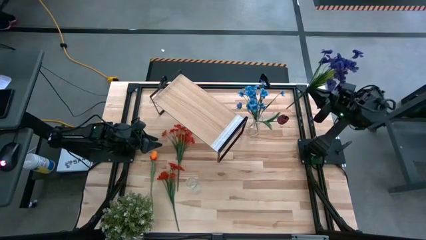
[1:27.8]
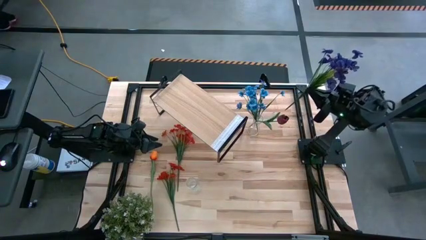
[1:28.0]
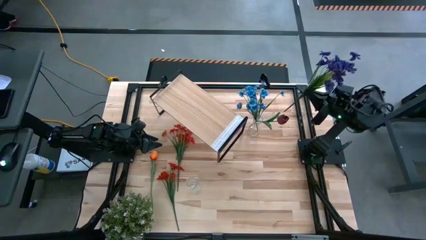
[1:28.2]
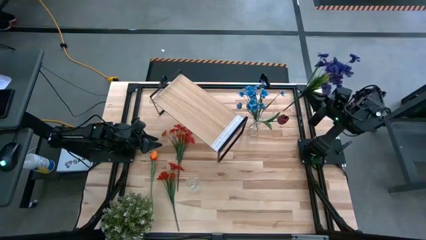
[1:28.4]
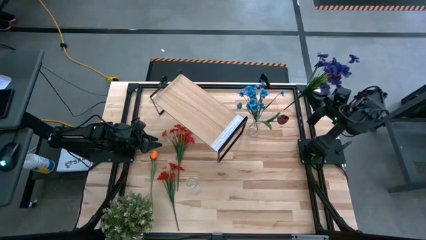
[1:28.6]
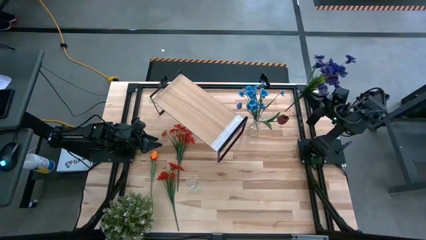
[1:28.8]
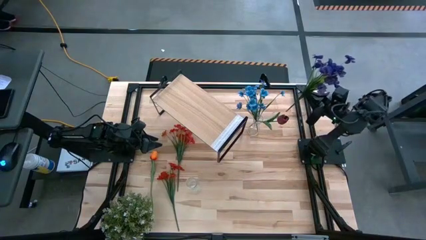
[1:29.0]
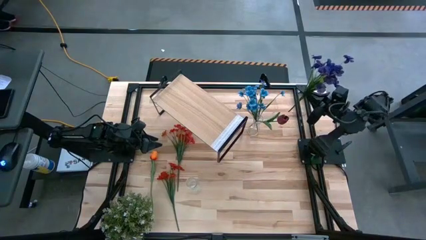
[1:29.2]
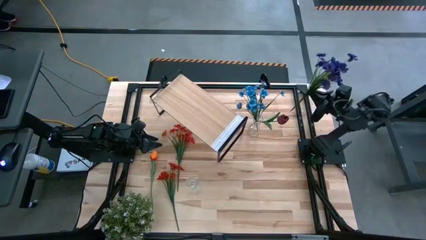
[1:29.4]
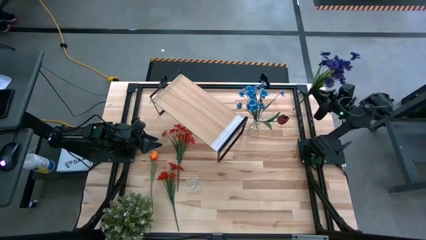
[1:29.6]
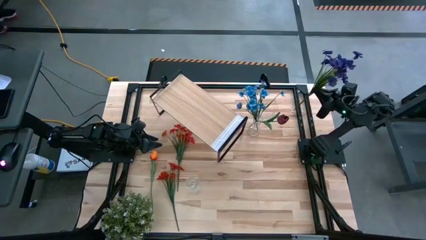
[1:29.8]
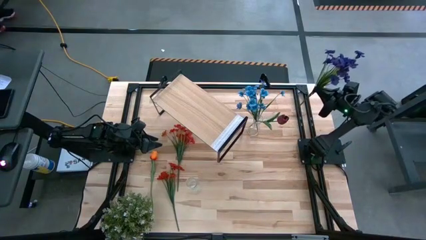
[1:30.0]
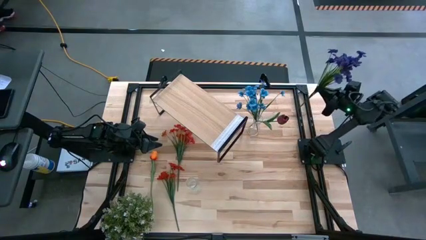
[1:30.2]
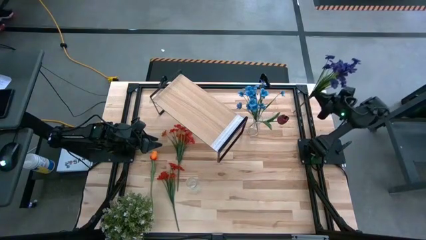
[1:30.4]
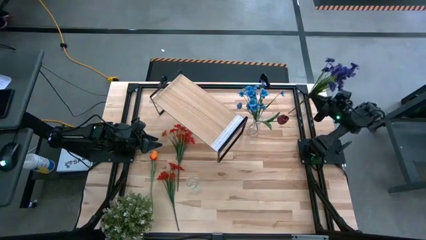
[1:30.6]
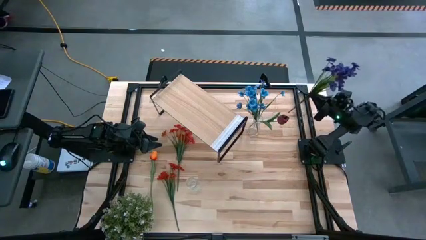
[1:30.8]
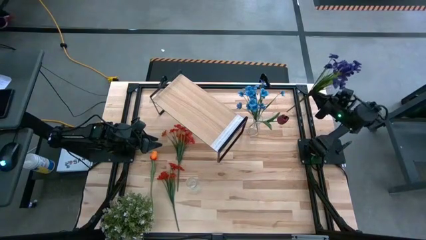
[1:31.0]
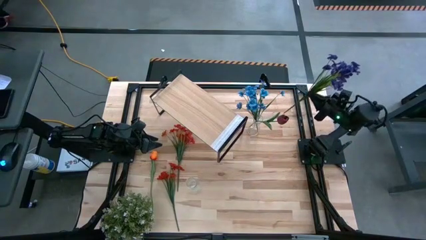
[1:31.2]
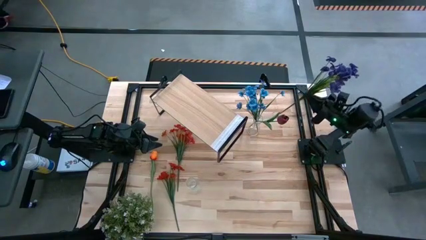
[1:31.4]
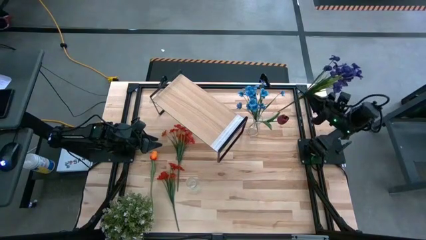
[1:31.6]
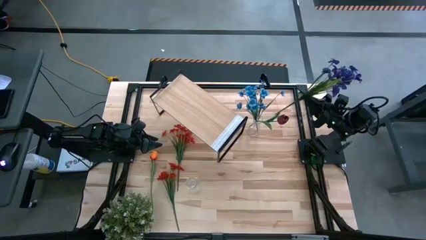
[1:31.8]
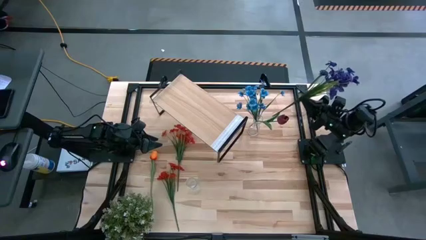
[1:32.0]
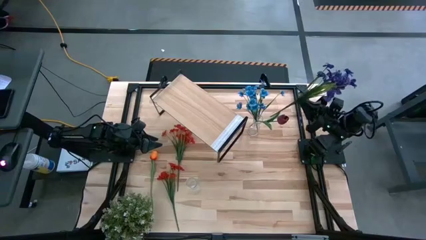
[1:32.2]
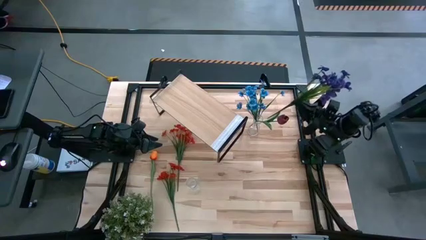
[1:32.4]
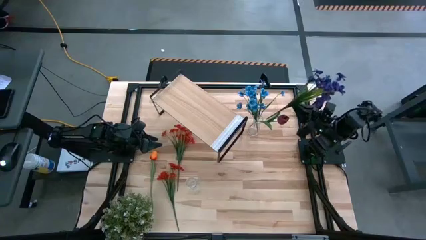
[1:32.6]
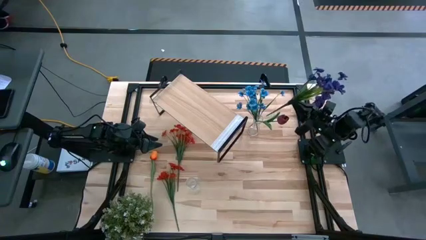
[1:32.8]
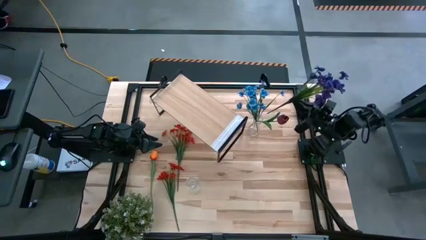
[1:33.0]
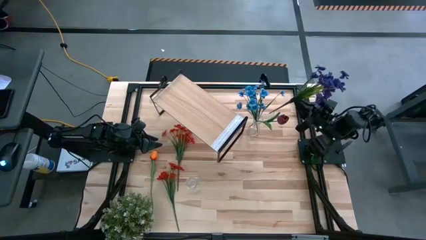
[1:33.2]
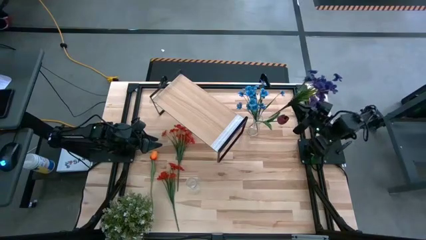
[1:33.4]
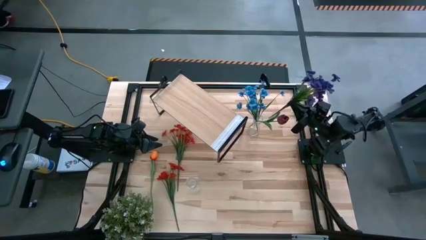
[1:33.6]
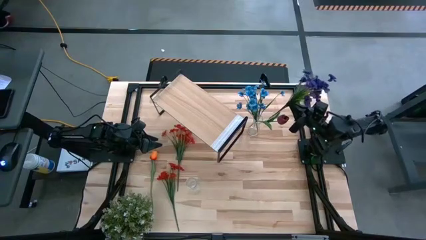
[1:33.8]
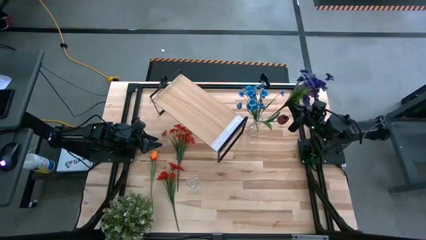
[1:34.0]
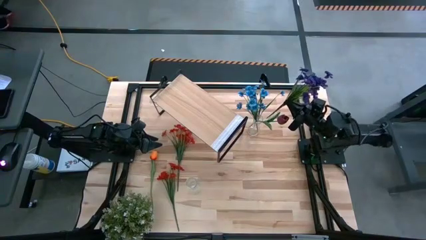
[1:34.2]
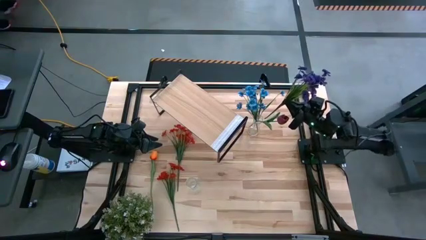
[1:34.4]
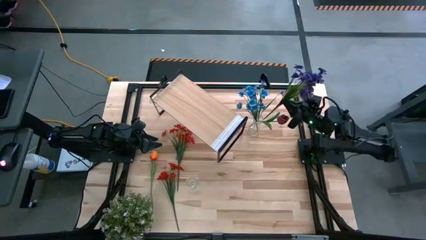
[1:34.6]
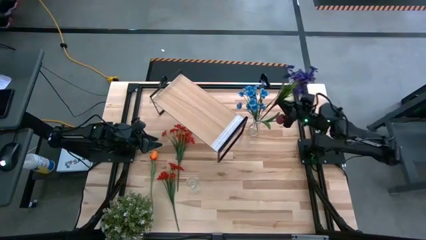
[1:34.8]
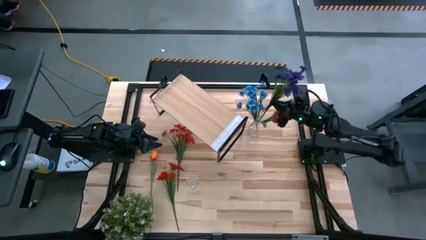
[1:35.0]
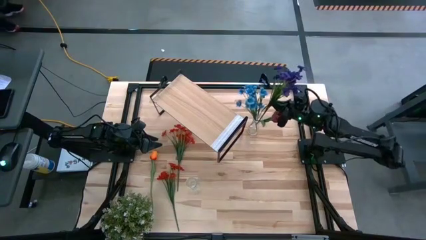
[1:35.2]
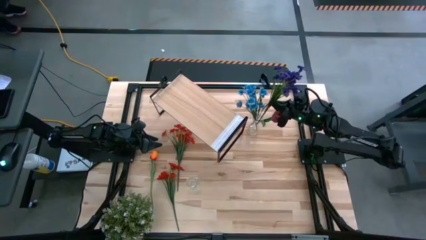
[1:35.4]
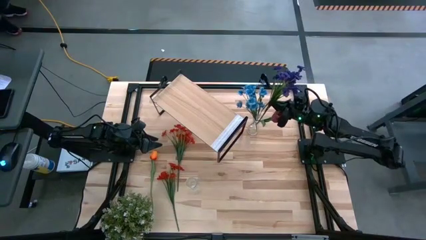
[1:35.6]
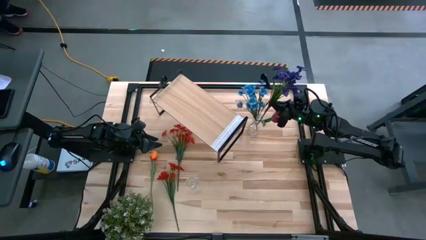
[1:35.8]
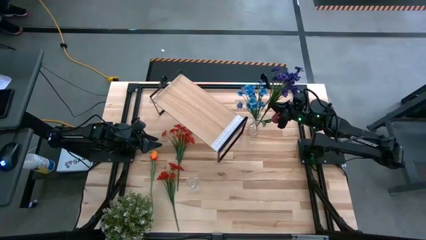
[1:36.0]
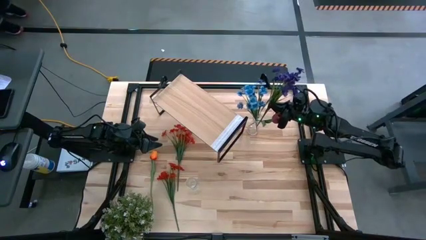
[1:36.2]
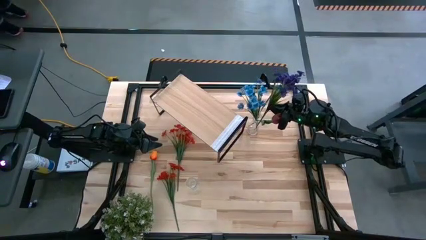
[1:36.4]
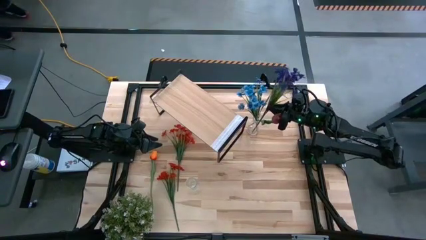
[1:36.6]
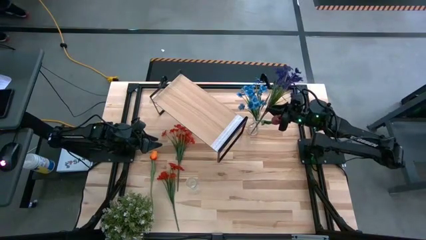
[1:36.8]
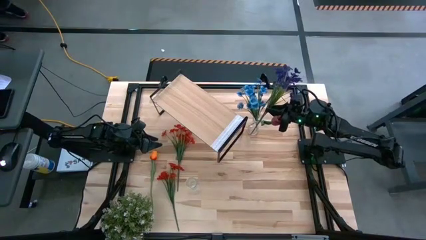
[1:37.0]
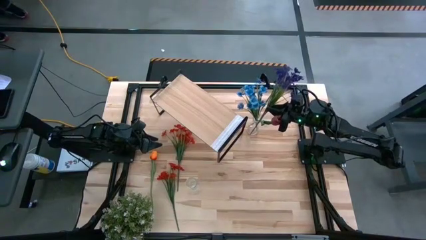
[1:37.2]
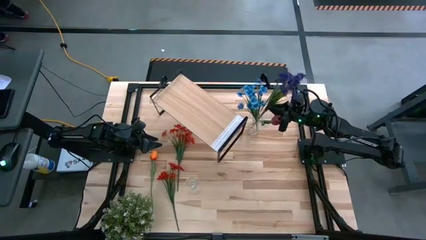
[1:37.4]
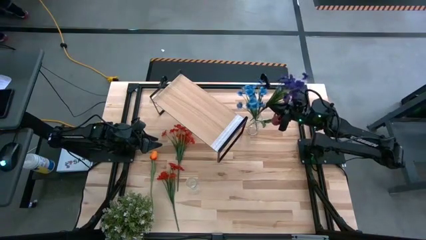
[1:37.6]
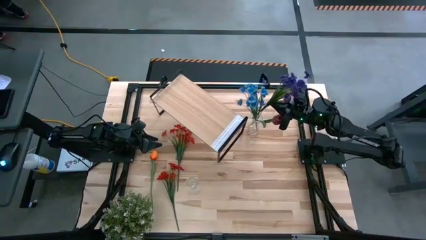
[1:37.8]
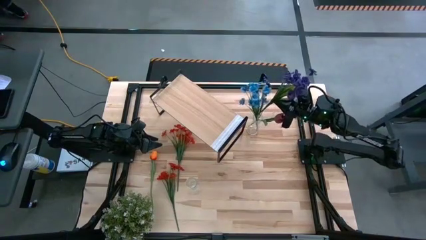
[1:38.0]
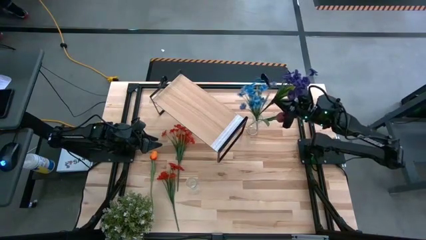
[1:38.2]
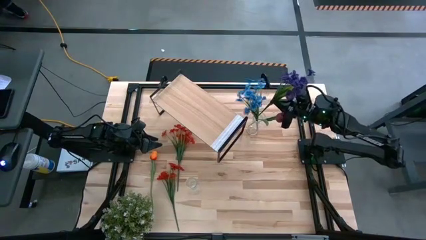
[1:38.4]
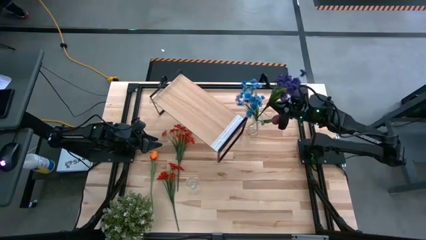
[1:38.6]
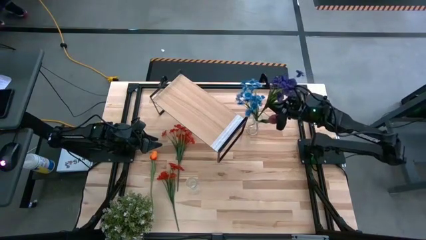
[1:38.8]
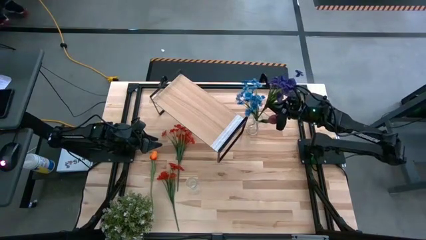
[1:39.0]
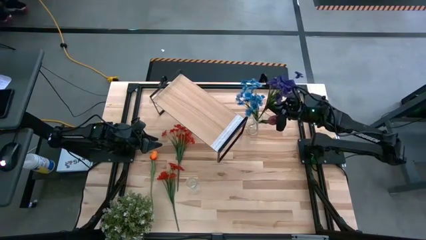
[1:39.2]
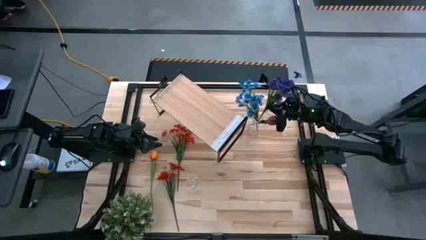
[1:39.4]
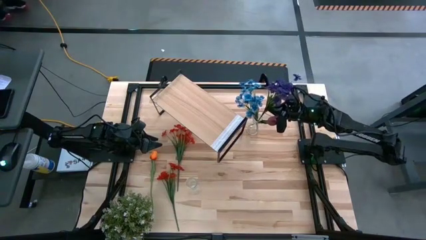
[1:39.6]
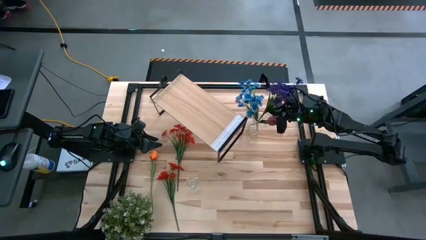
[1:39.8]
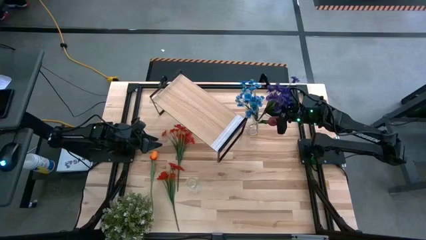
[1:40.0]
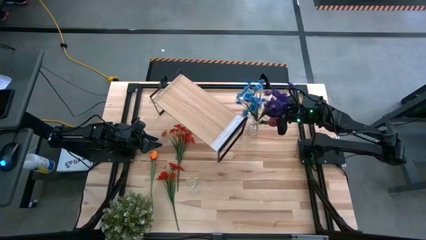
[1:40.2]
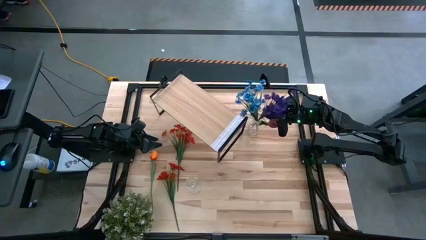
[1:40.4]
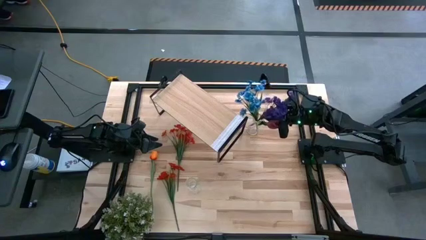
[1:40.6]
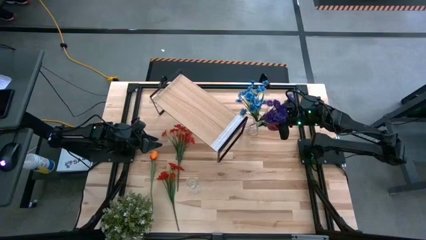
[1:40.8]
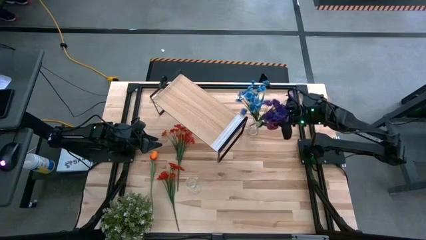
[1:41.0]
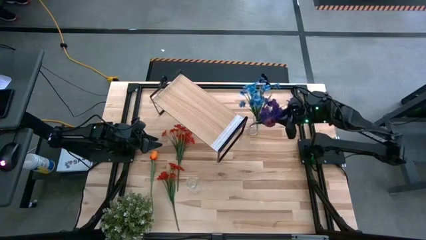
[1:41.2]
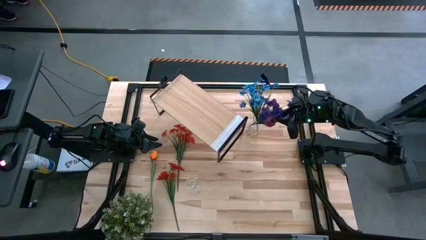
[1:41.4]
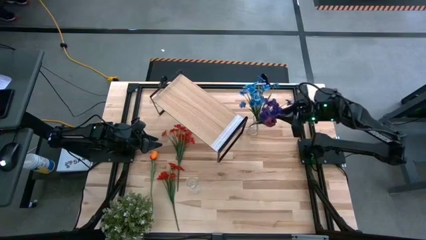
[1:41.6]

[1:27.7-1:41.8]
Task: Pick and place flowers into a vace then onto a shelf
Put the violet flowers into the top transparent vase
